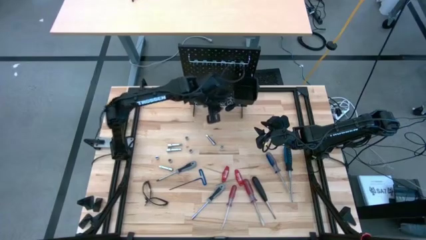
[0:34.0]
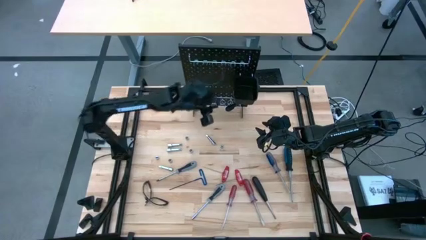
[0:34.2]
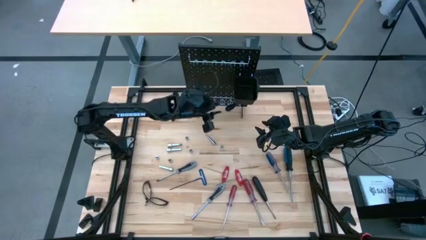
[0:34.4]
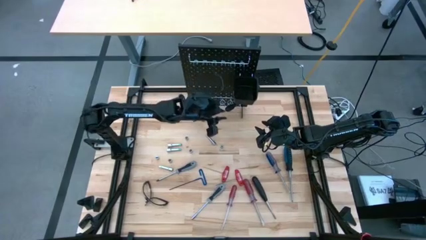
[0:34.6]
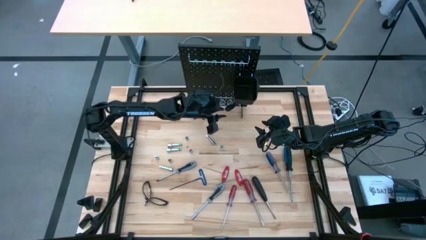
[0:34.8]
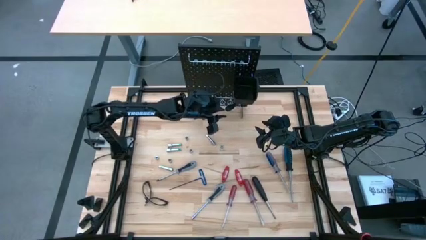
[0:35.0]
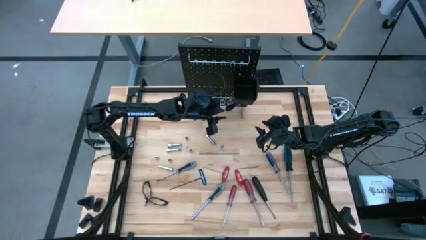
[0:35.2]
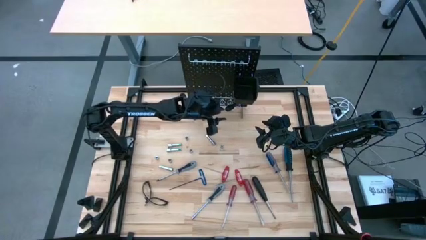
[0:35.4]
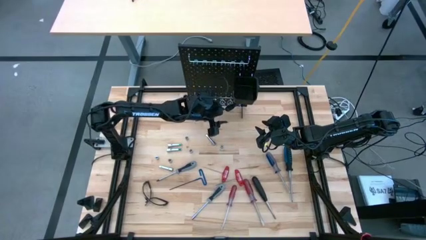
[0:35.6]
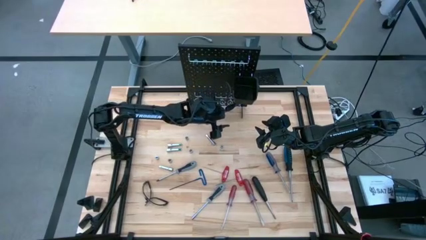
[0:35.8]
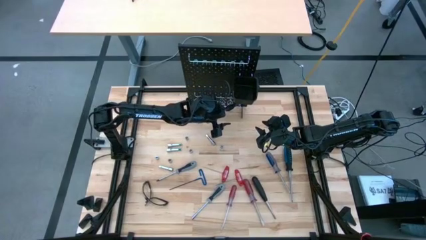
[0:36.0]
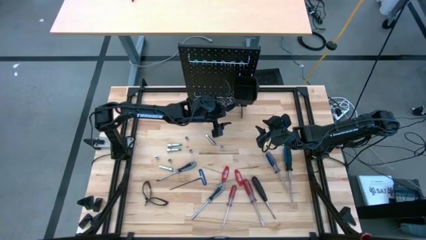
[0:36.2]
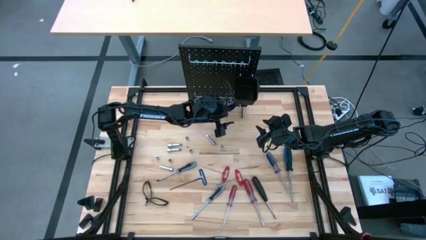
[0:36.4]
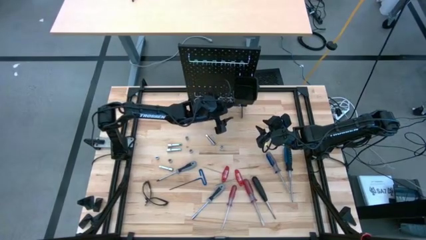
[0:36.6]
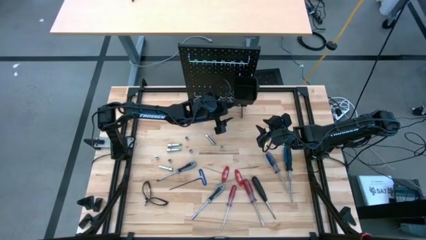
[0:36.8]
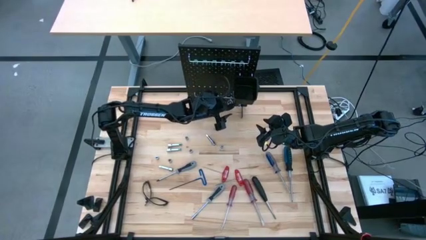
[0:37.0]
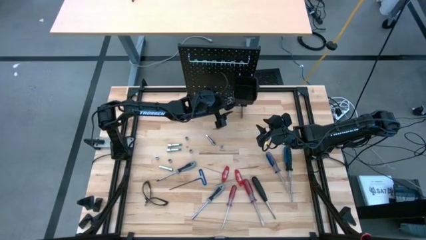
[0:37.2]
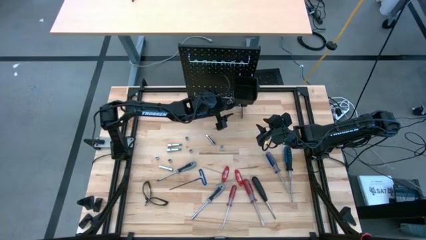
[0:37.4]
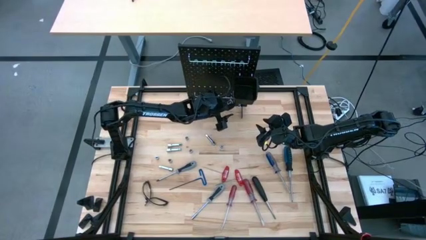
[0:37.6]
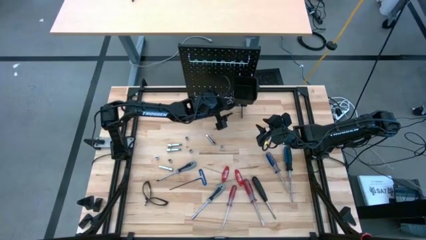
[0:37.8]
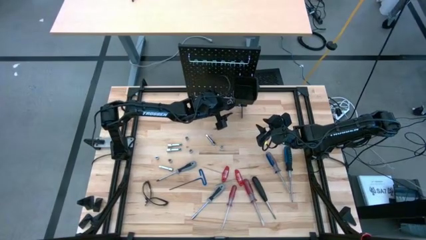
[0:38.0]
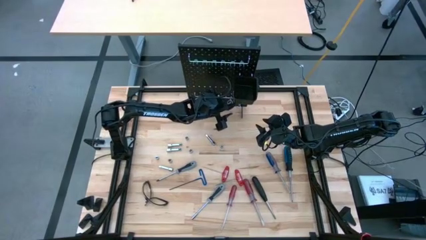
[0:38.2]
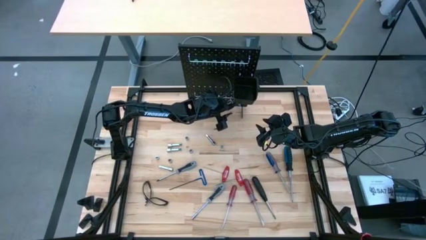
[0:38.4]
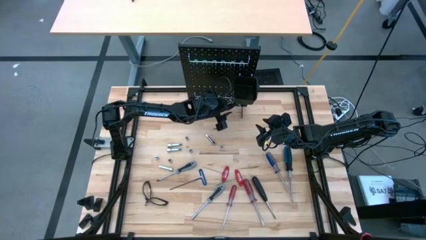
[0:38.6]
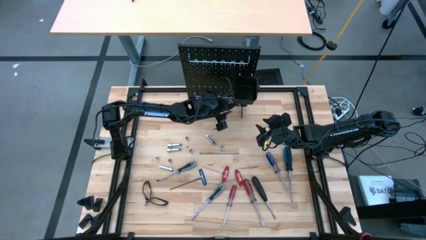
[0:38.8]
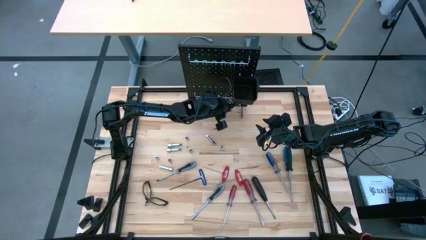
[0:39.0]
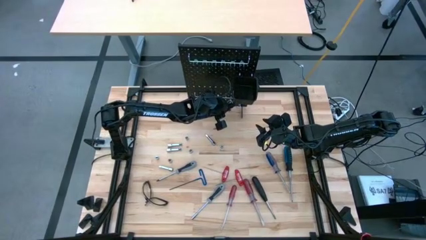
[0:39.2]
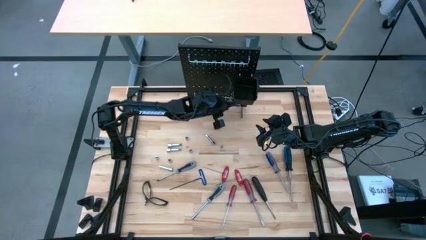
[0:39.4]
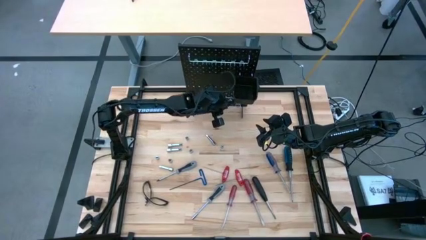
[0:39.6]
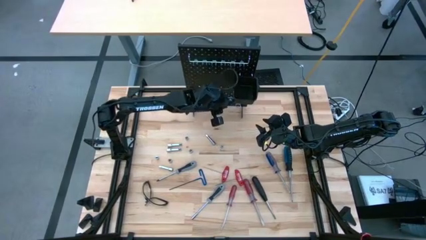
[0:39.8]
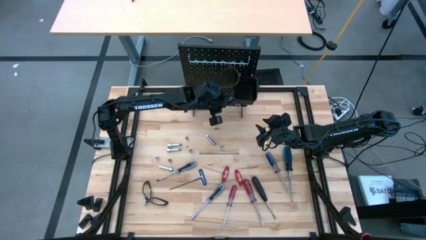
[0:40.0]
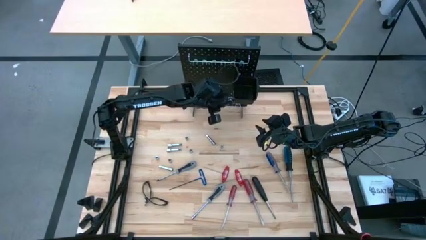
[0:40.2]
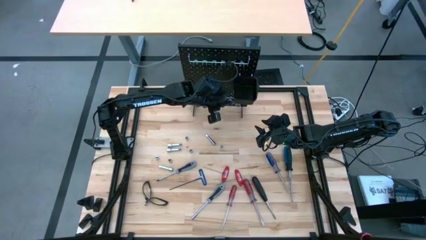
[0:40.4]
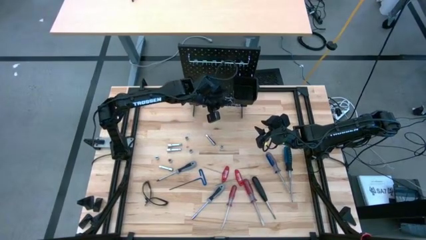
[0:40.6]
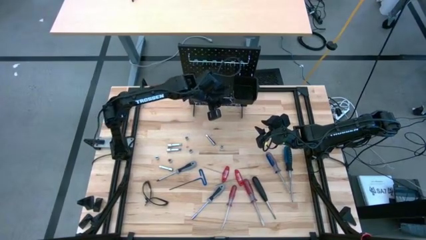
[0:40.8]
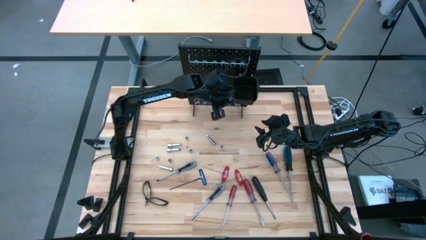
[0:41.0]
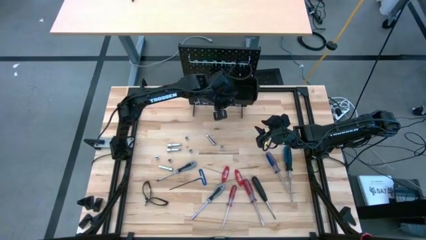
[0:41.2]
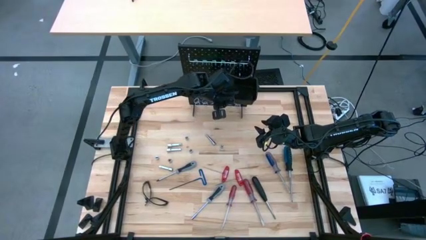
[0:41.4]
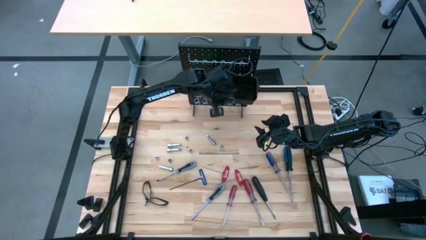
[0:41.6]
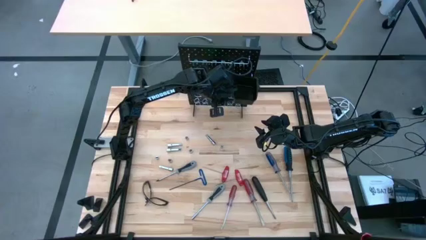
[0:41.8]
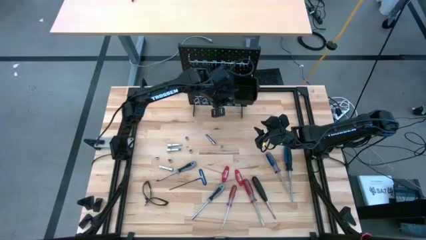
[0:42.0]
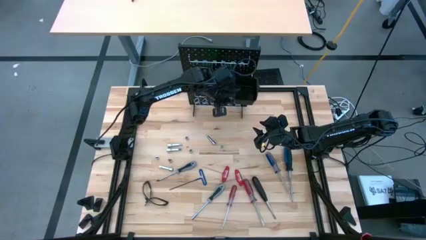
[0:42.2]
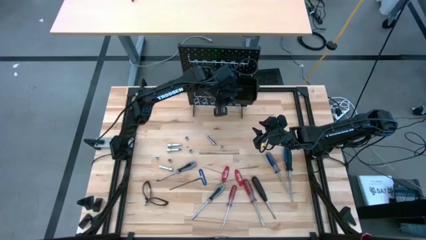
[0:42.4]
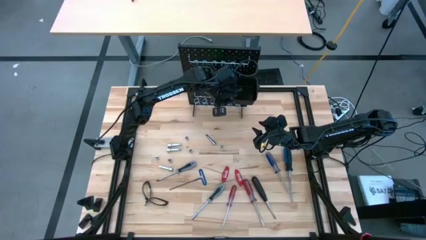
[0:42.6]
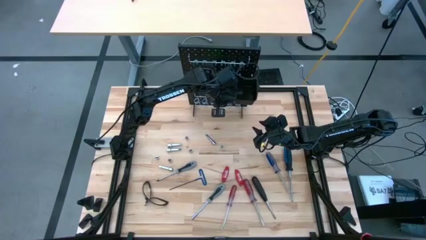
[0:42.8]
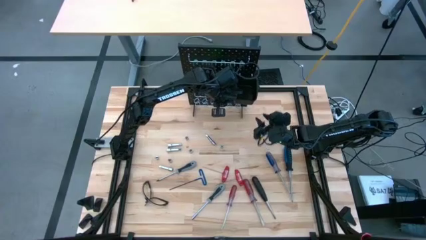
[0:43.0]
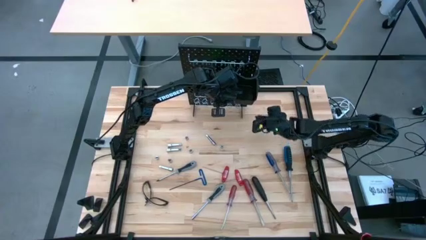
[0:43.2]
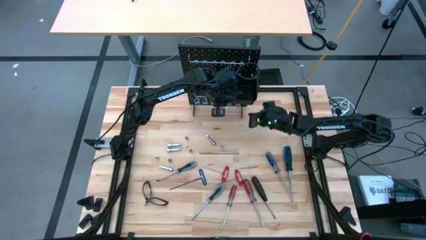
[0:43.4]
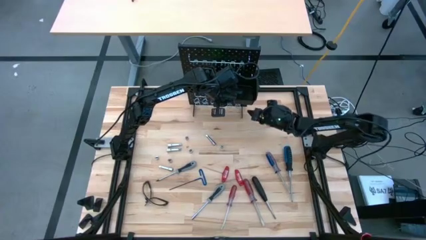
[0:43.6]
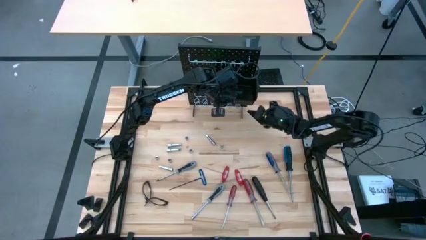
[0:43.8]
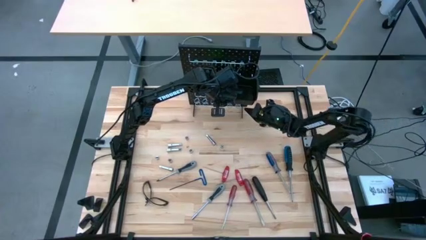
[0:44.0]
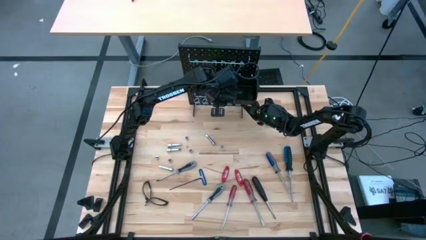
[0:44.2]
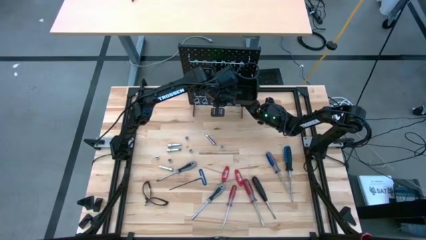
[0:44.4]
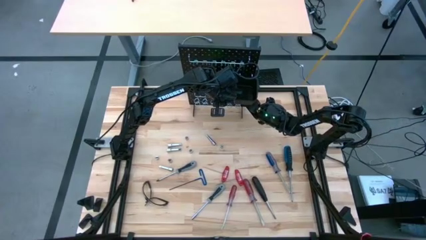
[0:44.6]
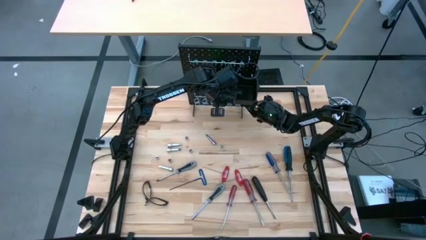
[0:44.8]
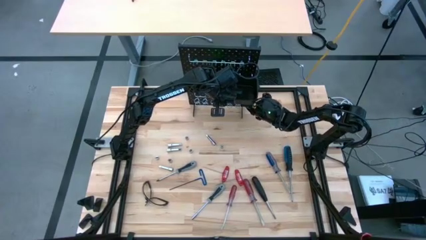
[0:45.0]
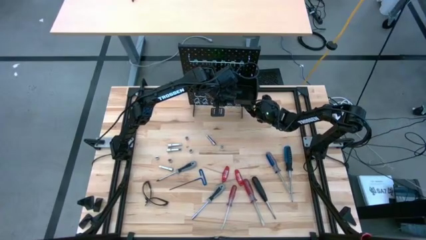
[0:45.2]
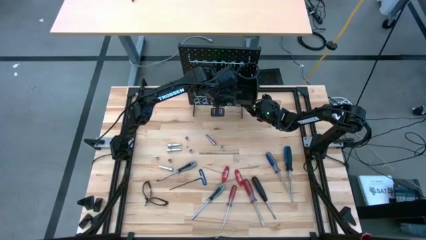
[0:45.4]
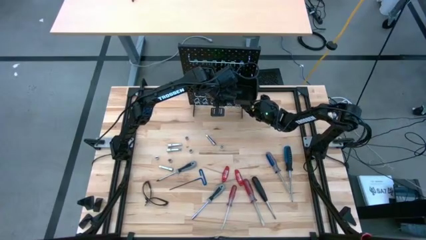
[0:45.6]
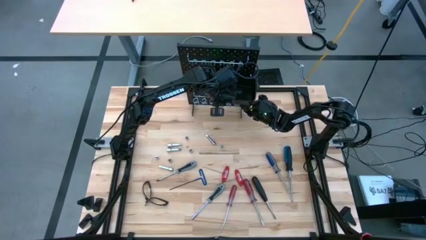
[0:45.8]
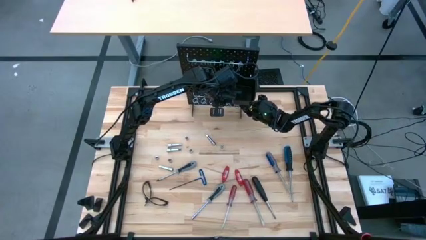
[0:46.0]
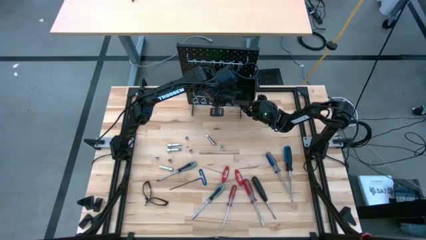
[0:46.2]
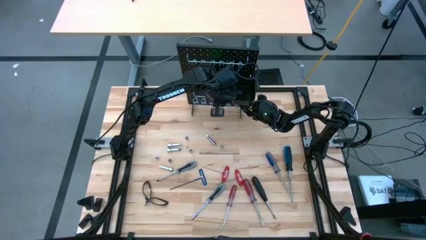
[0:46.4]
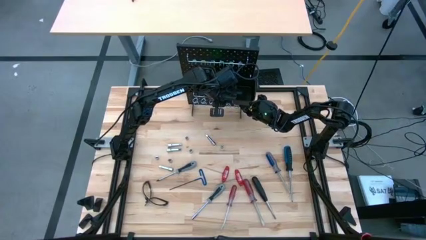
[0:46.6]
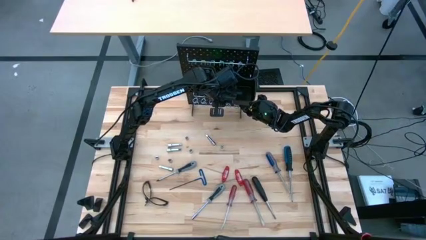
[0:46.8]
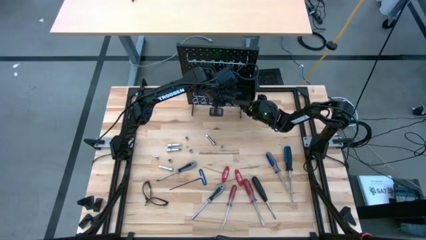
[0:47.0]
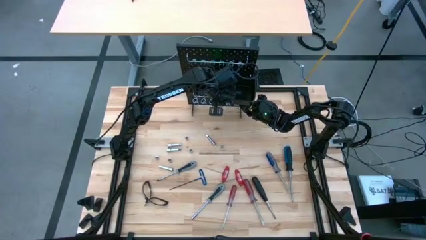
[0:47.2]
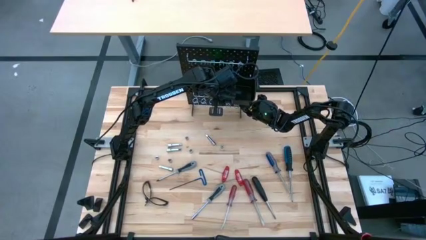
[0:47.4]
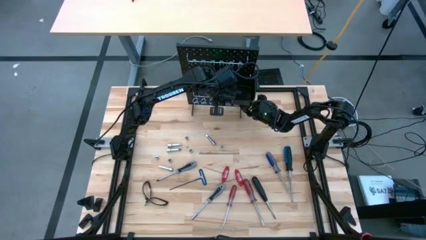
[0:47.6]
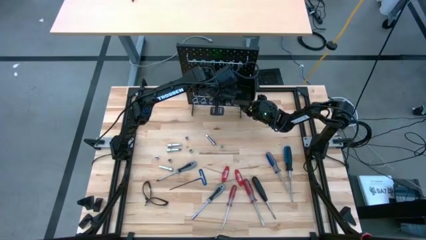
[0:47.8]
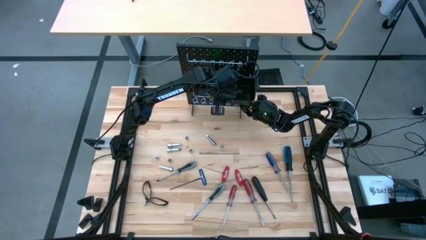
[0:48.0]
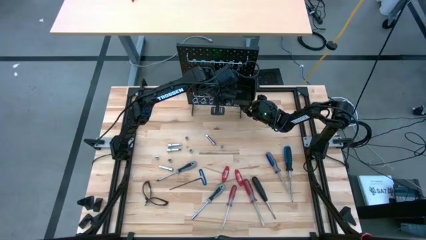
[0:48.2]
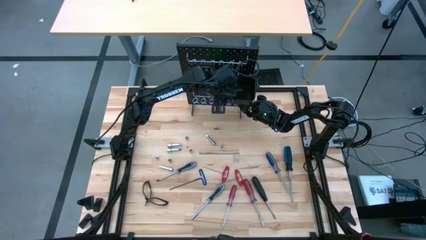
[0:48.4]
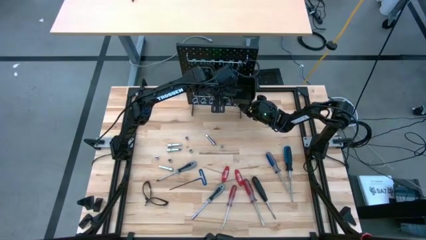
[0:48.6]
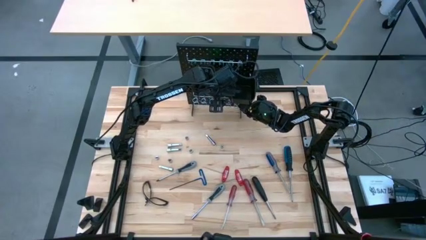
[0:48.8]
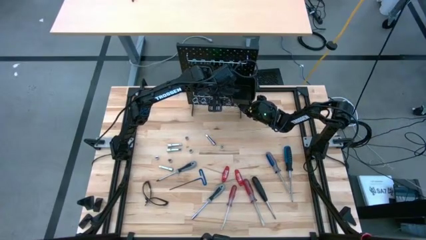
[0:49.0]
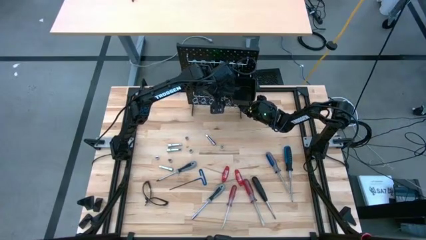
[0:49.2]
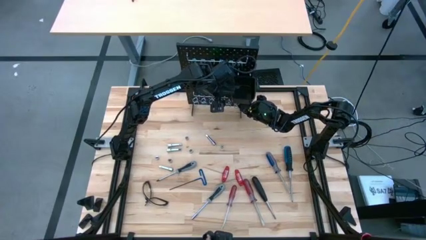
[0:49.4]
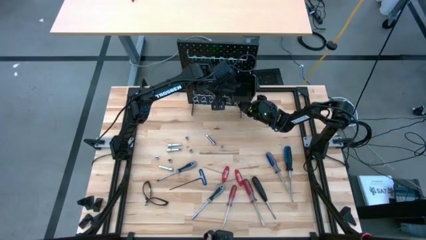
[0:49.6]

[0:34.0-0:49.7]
Task: Hang tools onto peg board
Hang the black screwdriver on the pegboard
